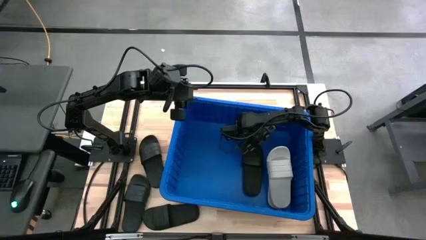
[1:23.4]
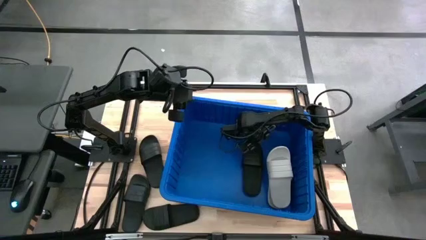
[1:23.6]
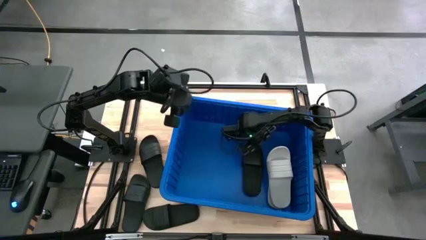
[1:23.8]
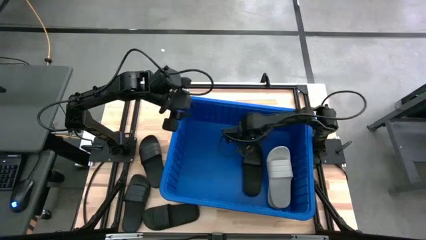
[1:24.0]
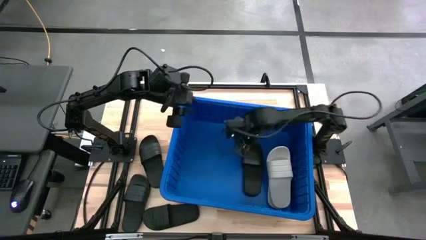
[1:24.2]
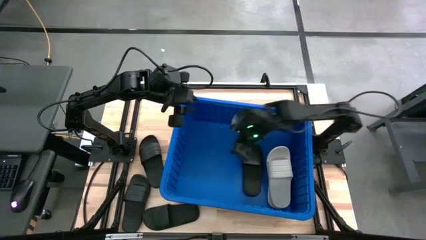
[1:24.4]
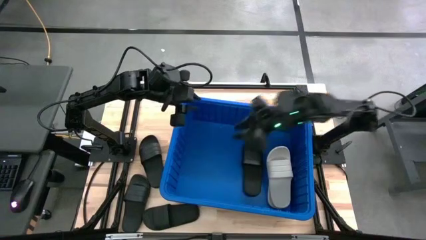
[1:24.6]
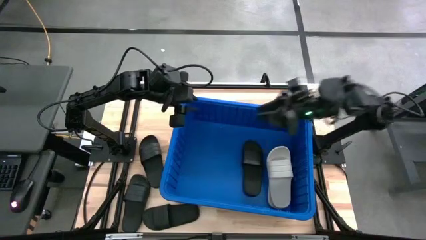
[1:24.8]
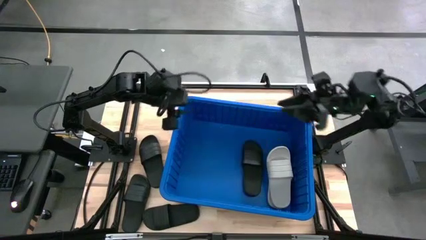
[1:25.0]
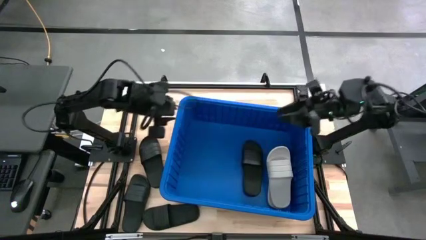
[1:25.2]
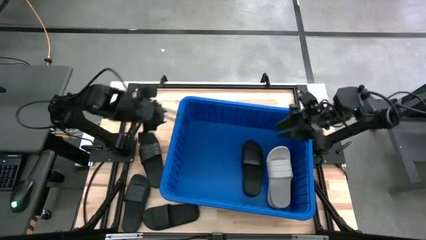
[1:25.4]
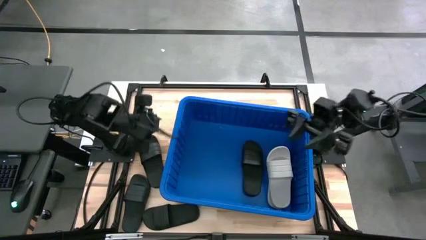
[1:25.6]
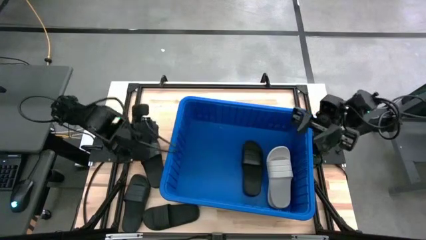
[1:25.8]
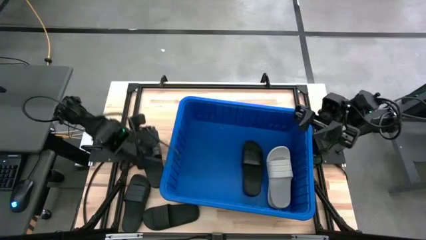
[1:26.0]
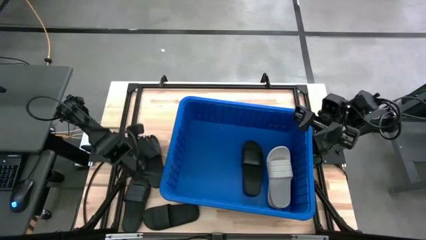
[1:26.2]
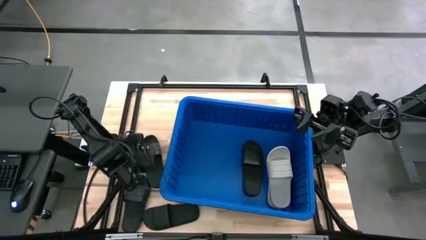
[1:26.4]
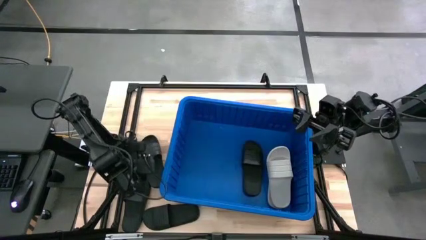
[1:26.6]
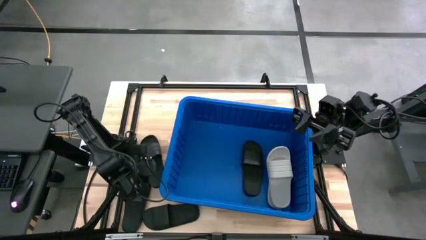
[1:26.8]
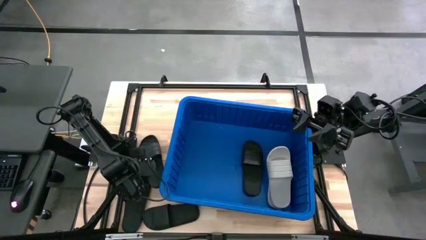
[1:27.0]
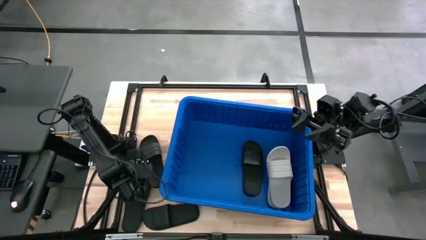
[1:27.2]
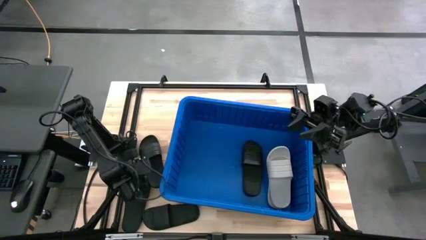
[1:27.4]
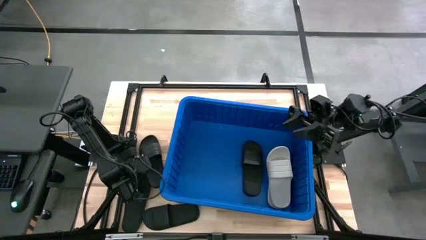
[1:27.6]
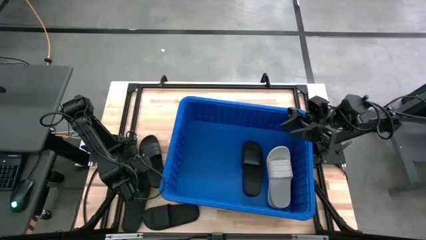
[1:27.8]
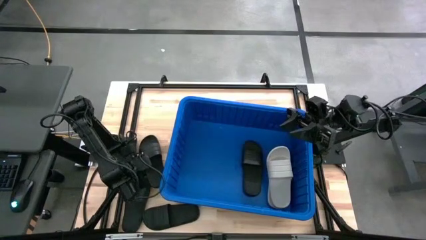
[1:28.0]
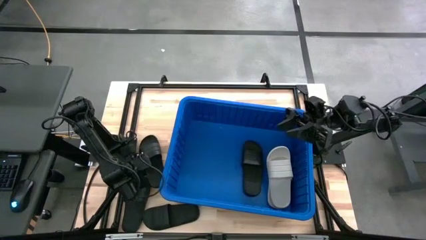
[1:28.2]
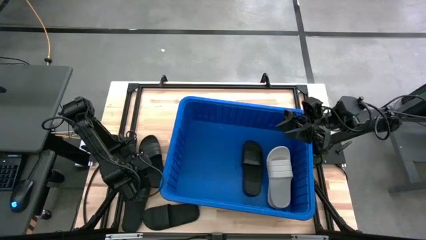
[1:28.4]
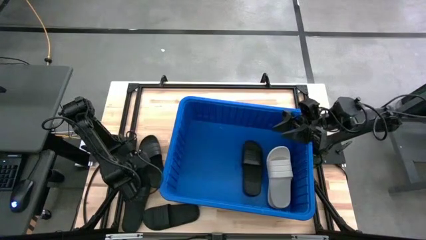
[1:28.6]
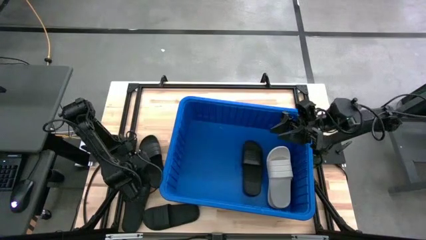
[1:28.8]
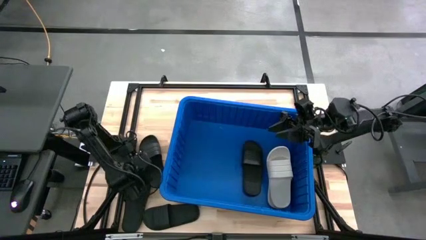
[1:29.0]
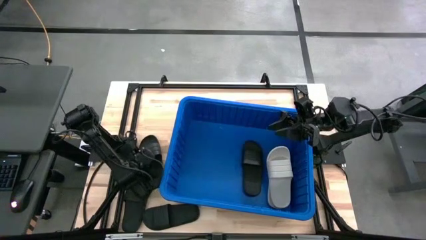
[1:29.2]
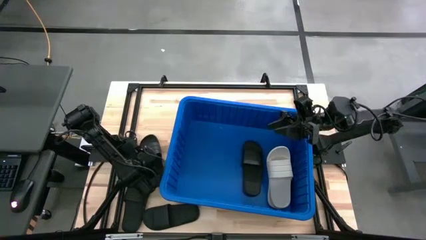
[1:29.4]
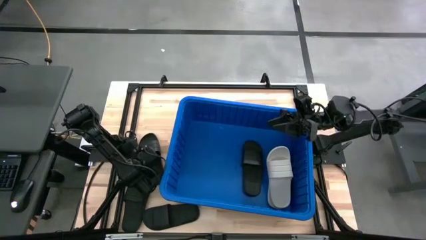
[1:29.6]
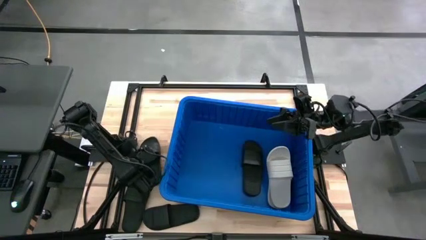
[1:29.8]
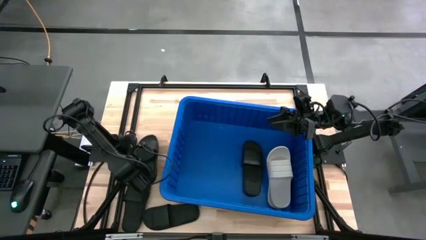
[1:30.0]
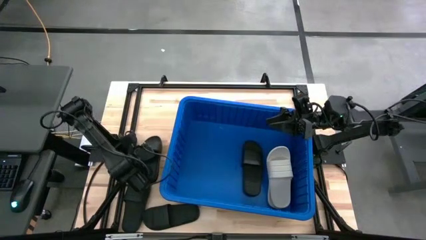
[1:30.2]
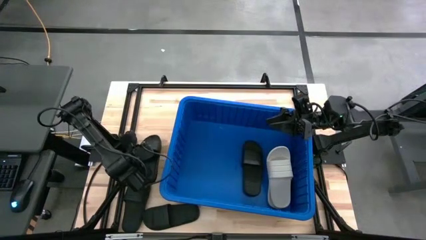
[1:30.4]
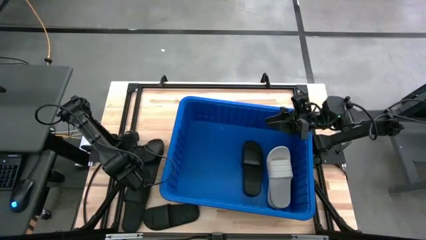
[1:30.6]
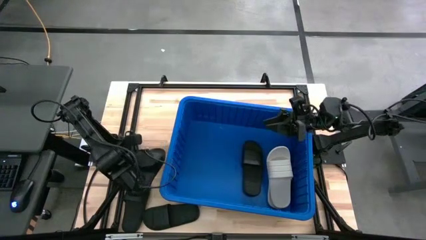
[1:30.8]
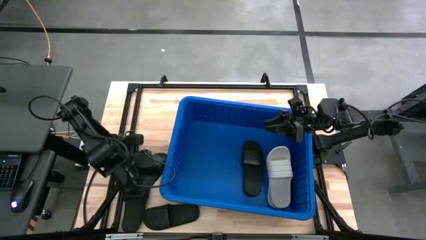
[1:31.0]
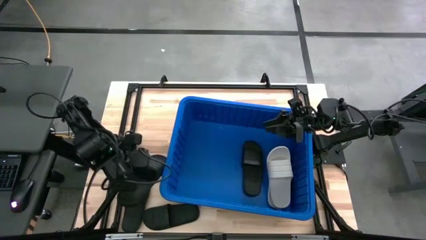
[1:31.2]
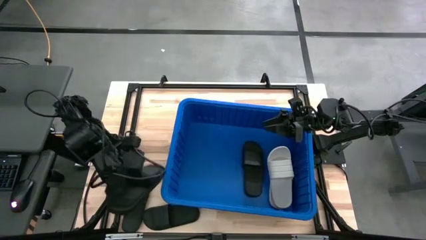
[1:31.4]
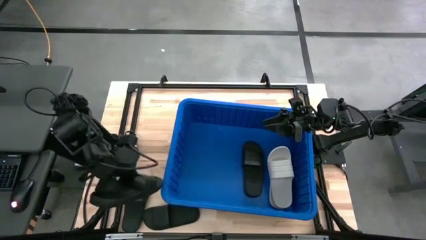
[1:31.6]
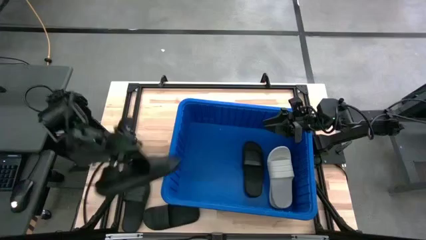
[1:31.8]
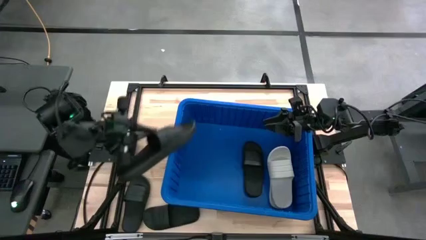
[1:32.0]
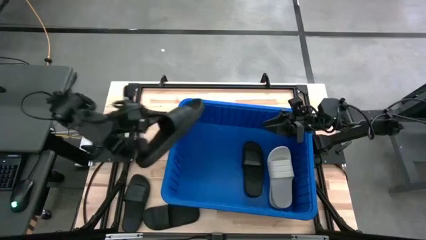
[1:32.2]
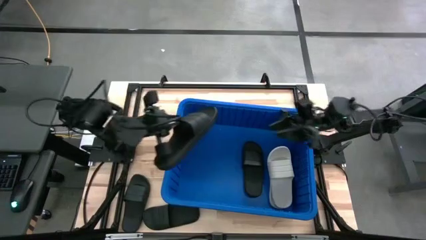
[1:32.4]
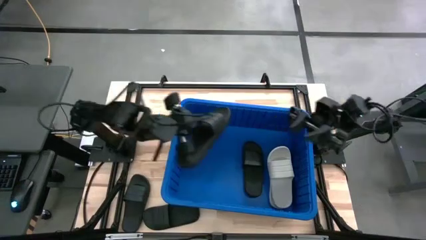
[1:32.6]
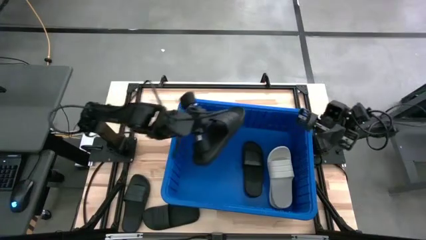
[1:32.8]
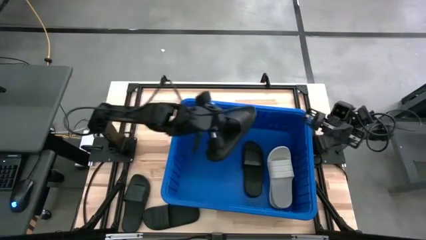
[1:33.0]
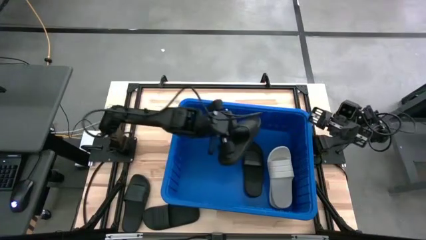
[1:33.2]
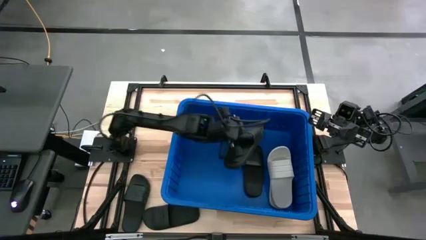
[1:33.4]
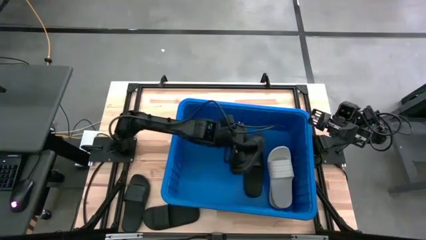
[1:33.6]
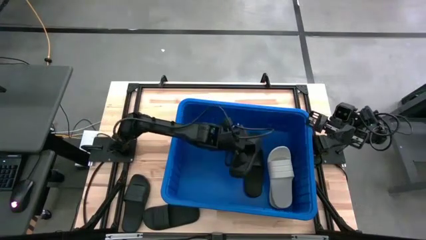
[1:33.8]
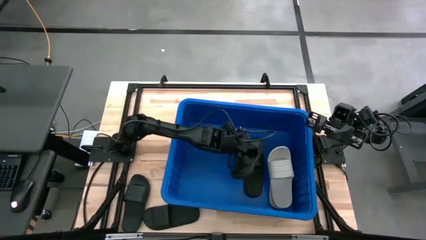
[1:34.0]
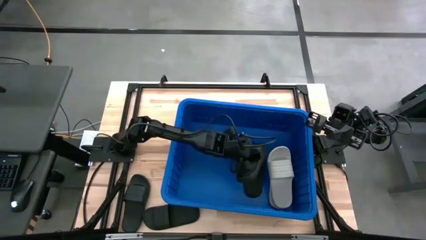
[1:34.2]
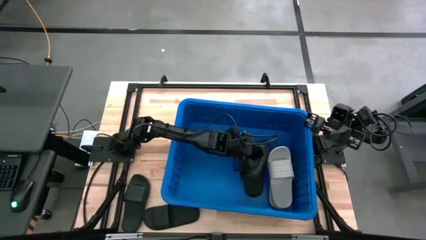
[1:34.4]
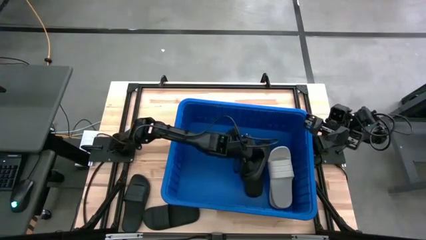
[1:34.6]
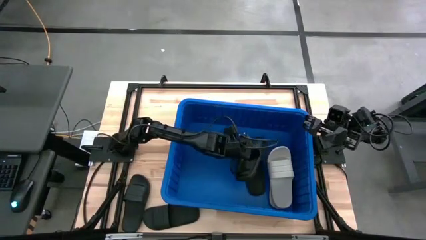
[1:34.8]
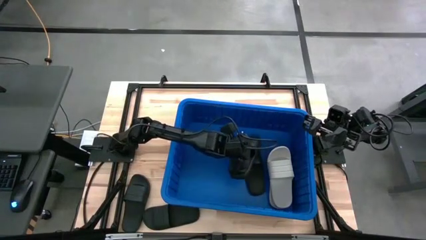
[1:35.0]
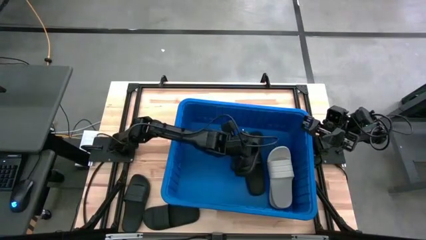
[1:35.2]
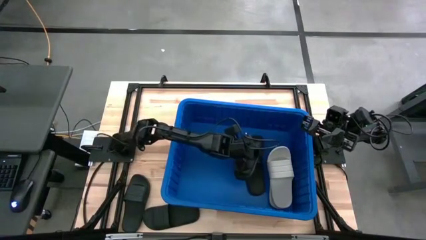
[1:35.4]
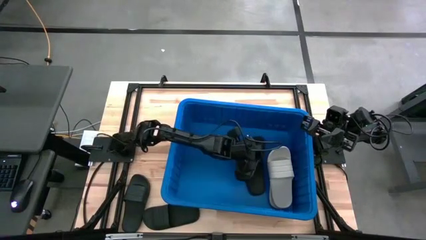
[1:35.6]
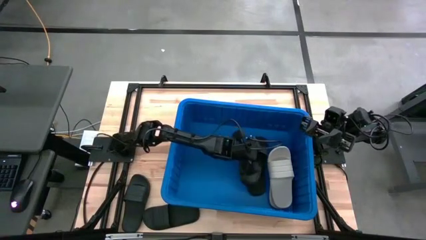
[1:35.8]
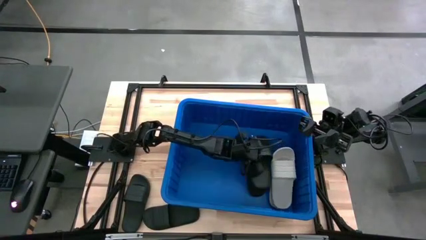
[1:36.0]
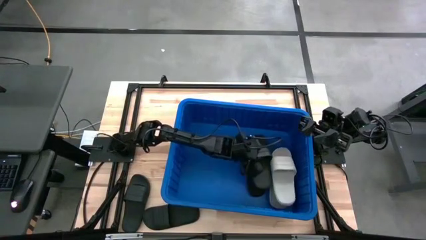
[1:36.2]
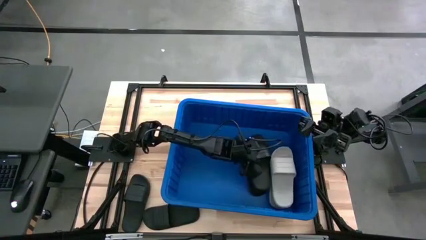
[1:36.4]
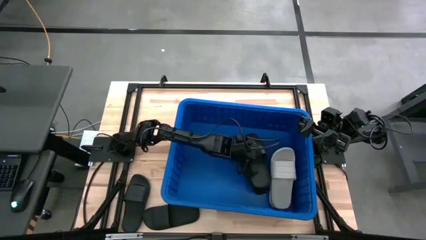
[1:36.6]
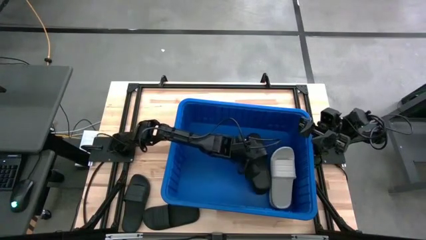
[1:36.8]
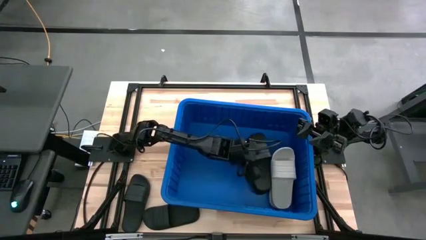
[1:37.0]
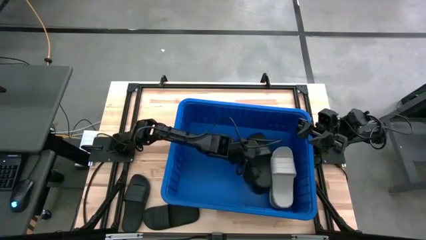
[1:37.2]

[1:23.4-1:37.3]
Task: Pick and place slides into bin
Put the black slide into the blue organizer bin
